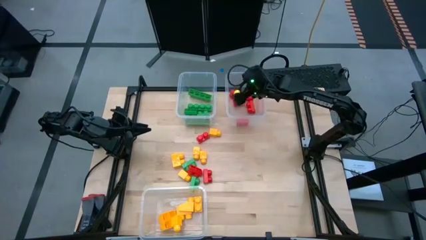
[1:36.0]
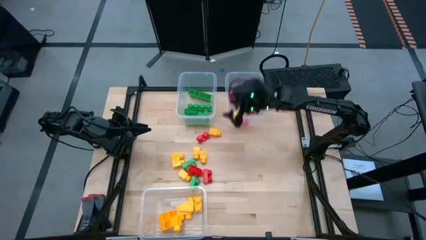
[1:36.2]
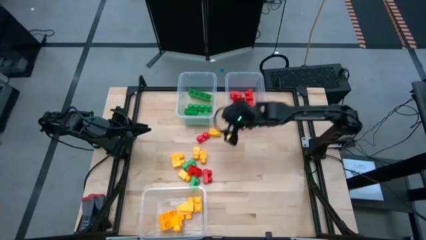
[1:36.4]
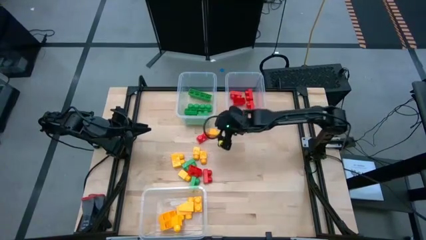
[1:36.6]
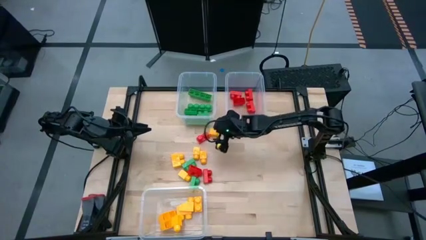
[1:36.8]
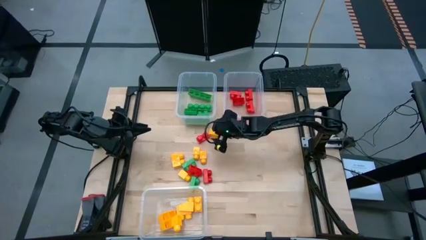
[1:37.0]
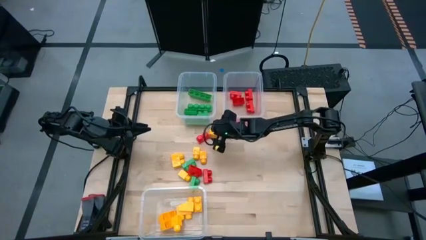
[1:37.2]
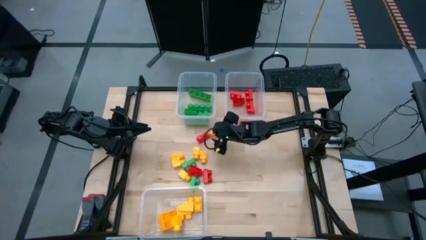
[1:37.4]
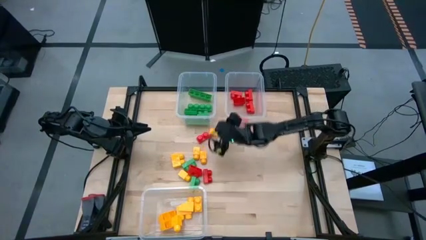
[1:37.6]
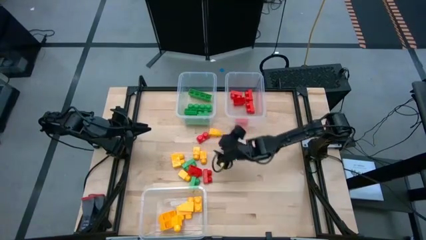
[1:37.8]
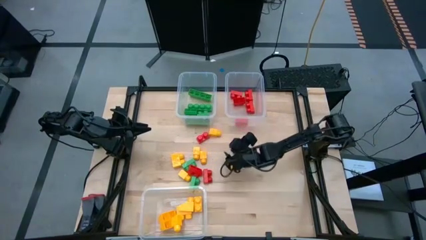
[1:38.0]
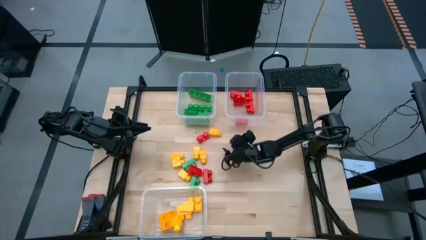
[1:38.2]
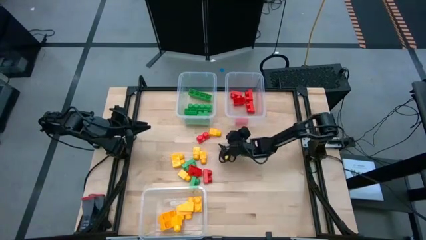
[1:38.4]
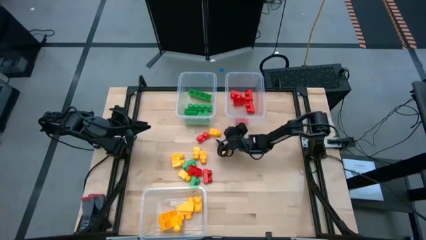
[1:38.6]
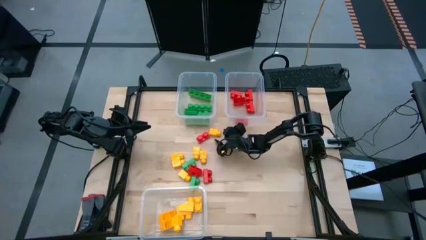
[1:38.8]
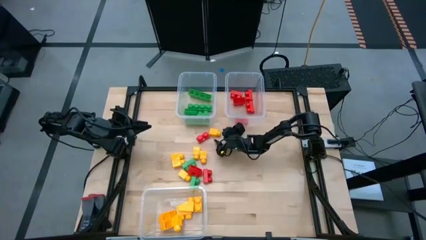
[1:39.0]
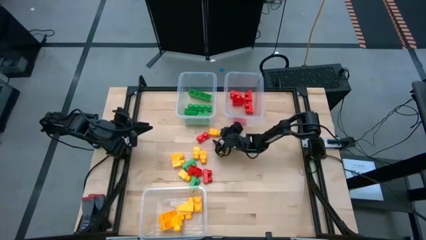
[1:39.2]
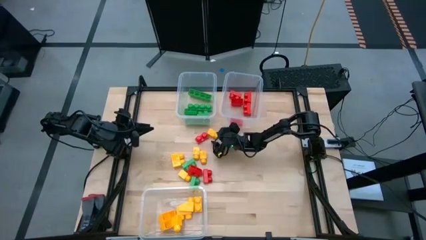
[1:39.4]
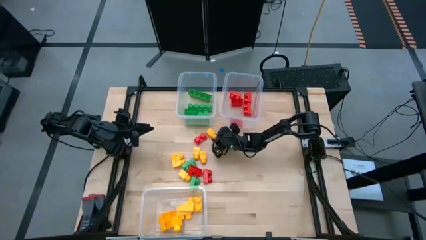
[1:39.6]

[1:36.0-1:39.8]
Task: Sort blocks
Put the yellow game piece into the bottom transparent bin

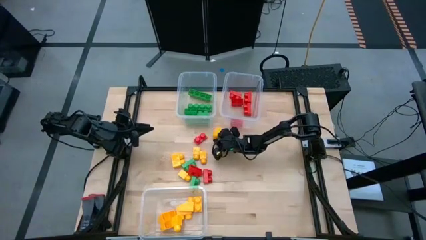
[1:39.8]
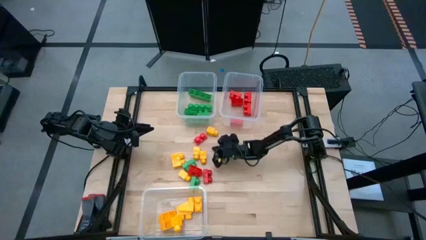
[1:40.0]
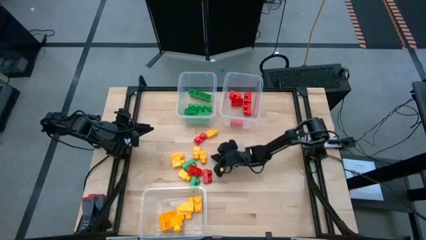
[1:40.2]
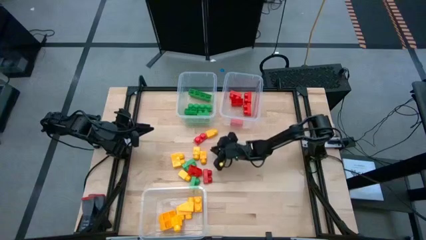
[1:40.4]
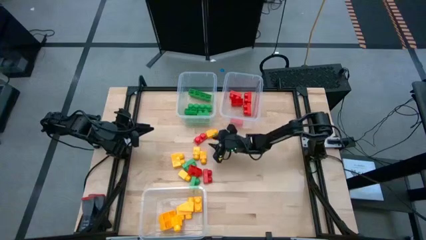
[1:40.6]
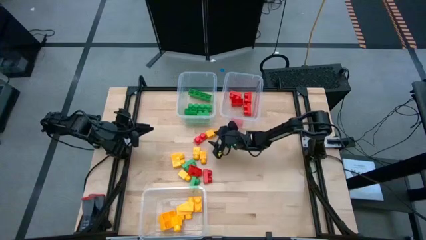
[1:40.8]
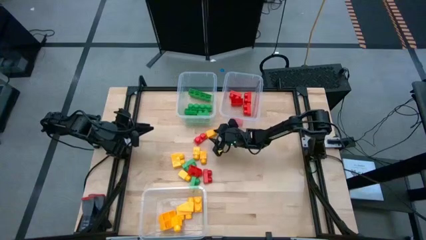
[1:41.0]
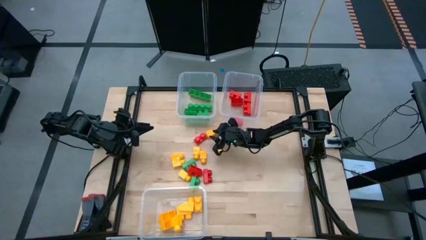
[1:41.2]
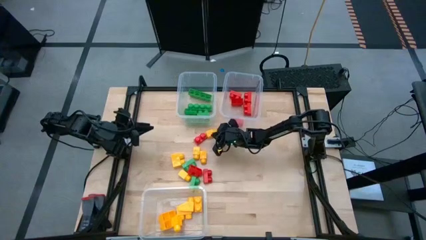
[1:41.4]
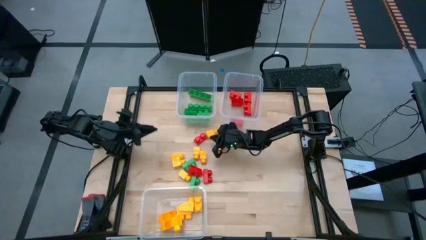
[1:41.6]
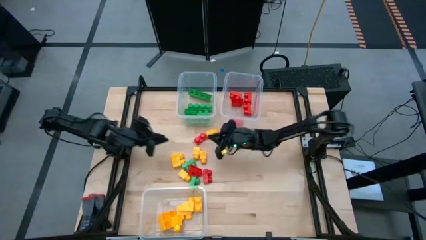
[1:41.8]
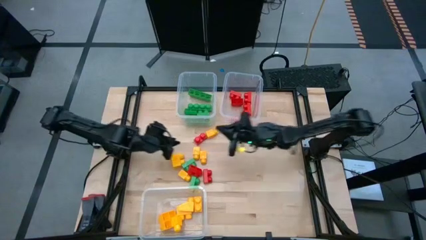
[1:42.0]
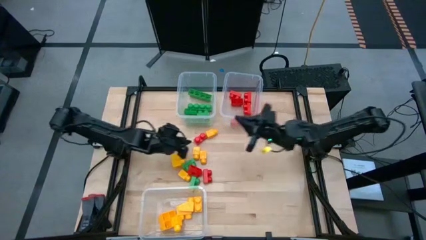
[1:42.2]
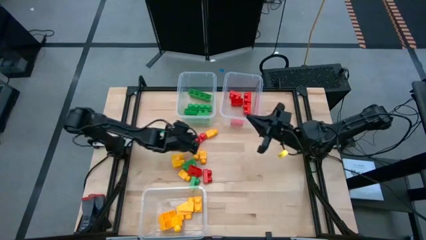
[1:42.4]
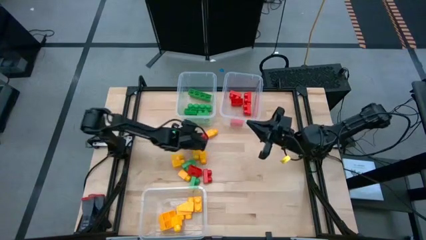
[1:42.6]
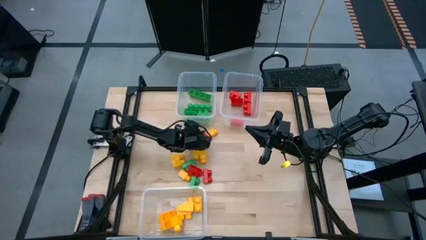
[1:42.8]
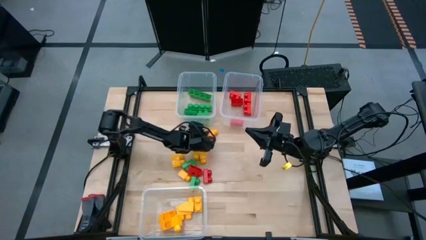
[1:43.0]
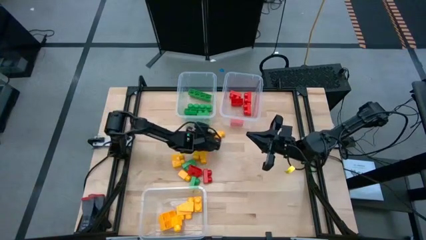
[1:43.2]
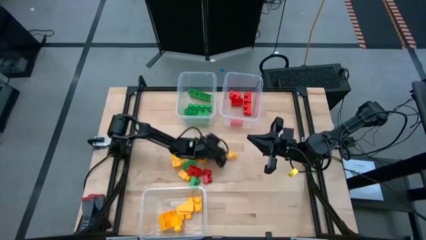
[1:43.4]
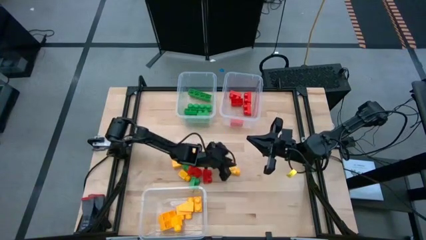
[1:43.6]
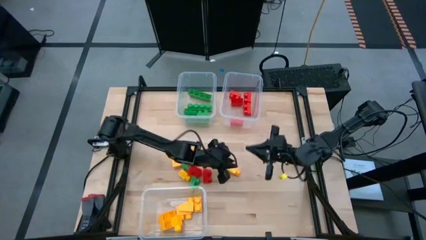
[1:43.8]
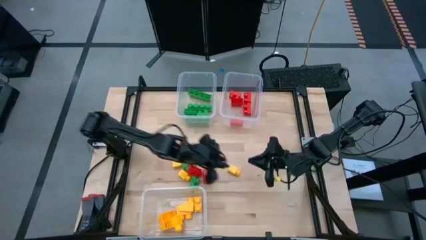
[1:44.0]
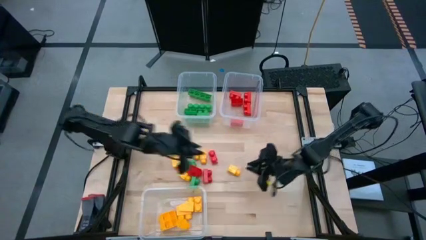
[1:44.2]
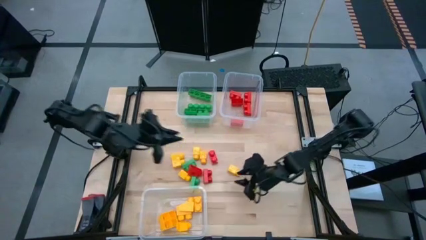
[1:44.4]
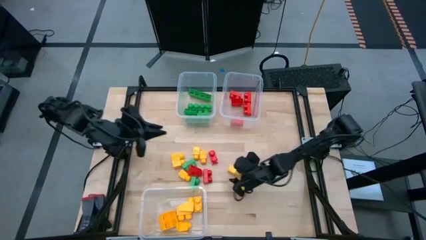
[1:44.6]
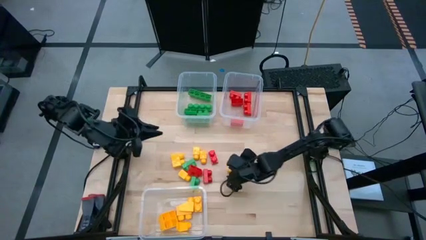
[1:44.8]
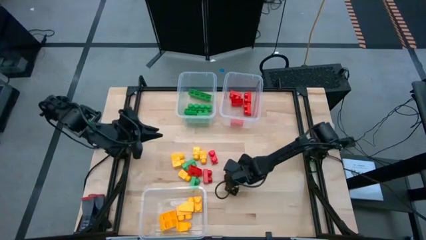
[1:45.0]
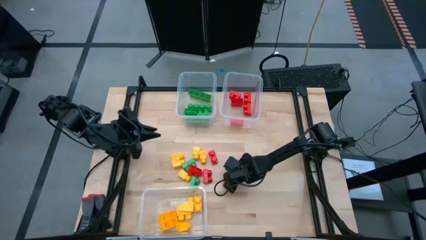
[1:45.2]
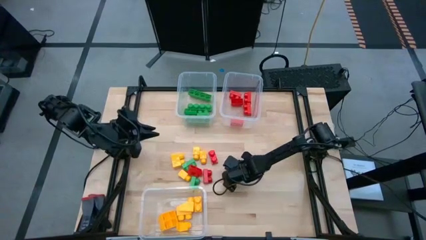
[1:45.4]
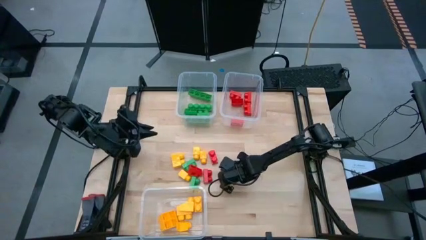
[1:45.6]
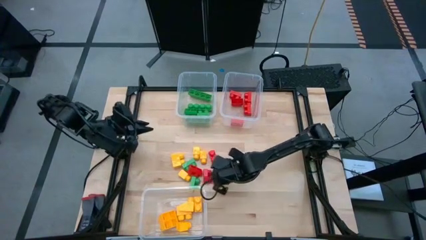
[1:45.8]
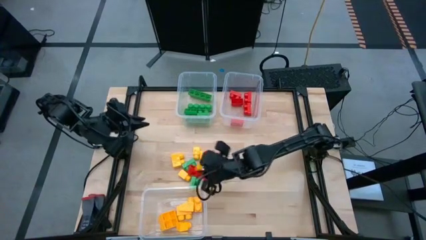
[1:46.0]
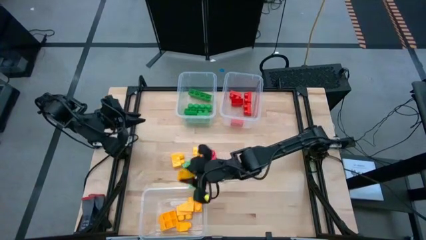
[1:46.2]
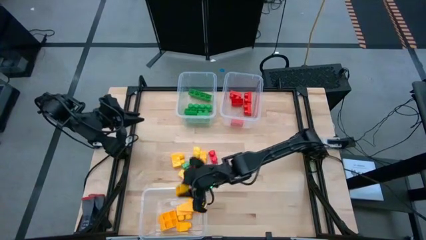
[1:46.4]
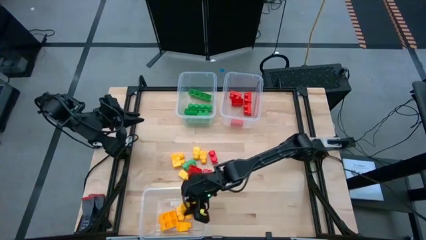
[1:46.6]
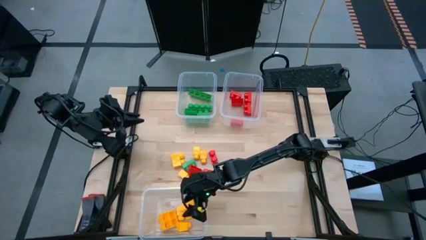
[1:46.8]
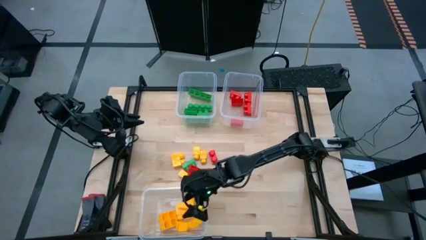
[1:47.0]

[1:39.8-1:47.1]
Put the yellow game piece into the bottom transparent bin

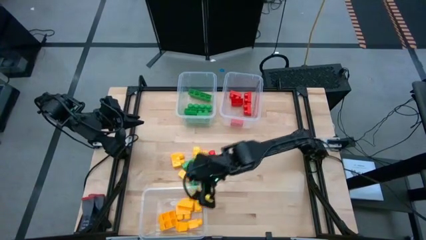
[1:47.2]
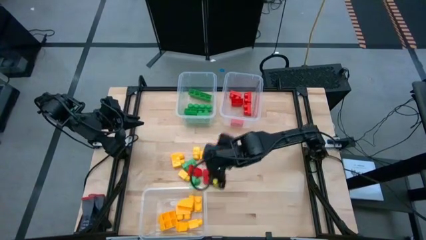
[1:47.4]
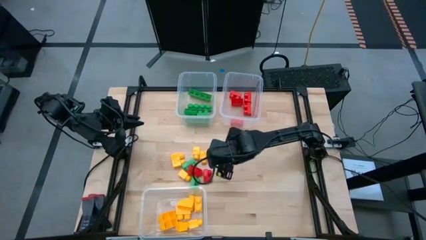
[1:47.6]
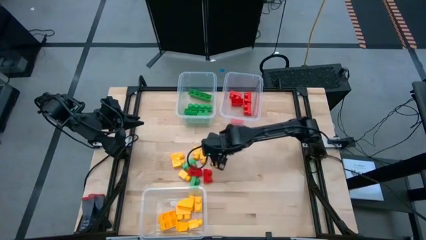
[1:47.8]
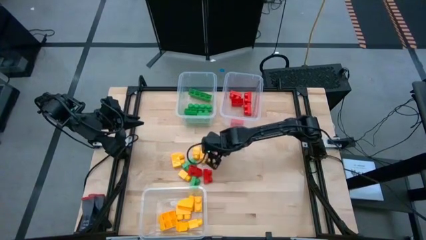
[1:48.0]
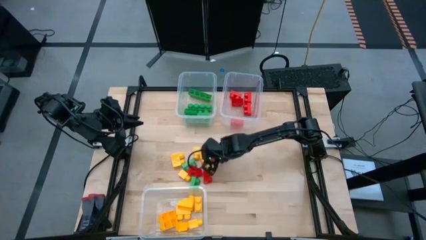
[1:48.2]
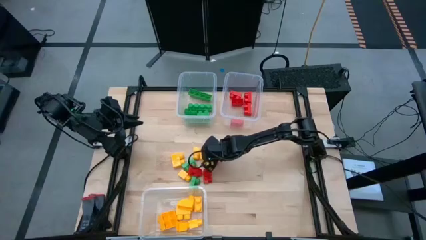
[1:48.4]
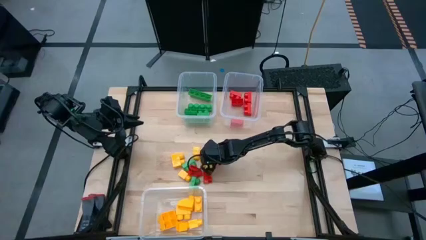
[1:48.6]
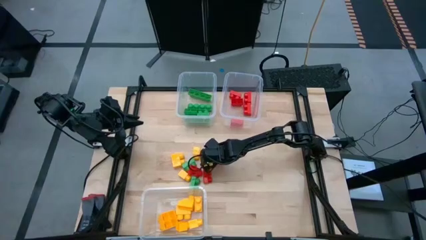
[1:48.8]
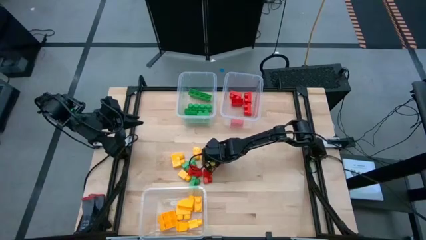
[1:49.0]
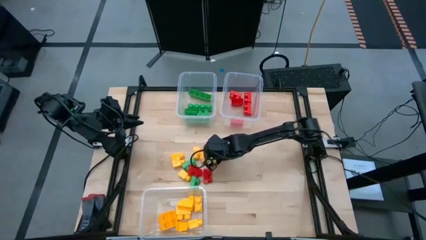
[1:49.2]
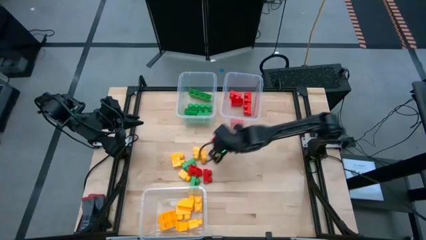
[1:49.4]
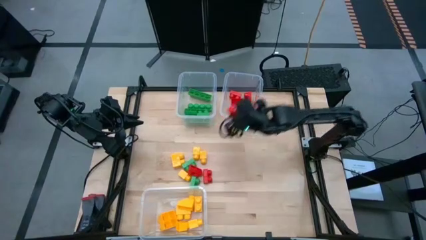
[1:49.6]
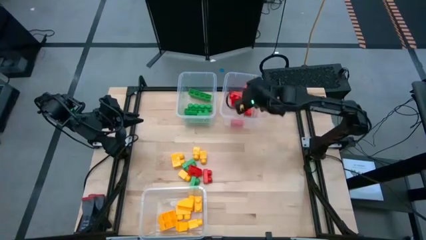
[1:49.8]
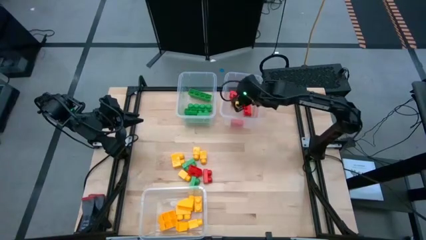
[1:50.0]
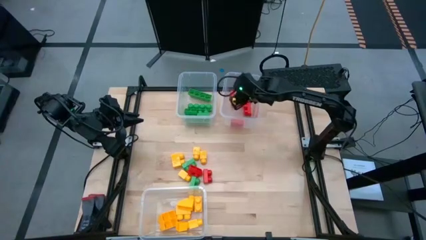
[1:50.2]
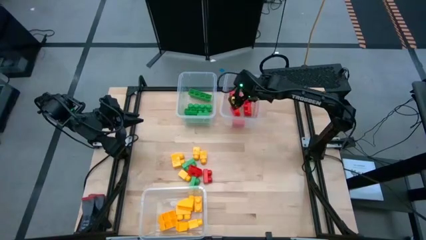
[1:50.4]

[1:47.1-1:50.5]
Put the red game piece into the top right transparent bin

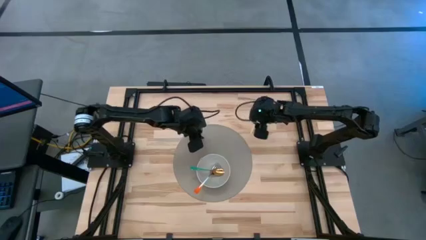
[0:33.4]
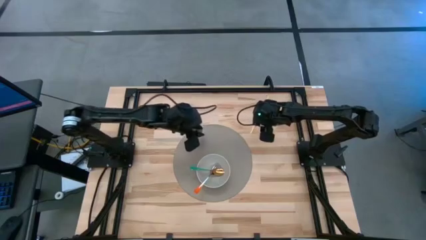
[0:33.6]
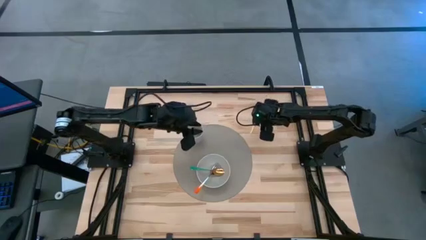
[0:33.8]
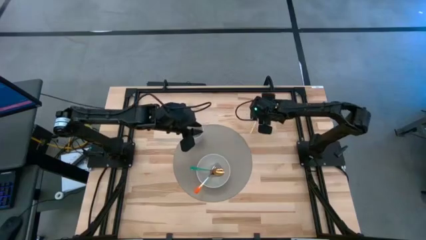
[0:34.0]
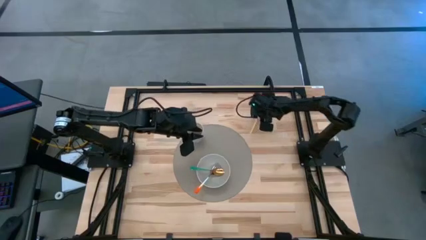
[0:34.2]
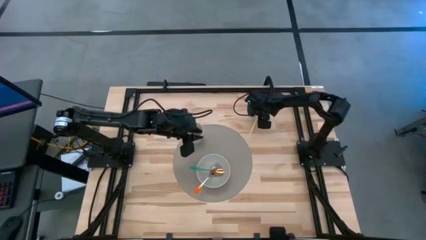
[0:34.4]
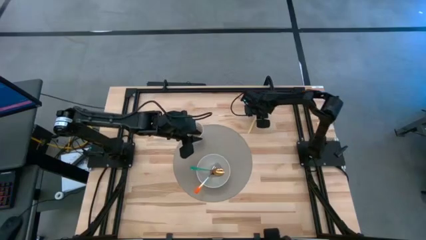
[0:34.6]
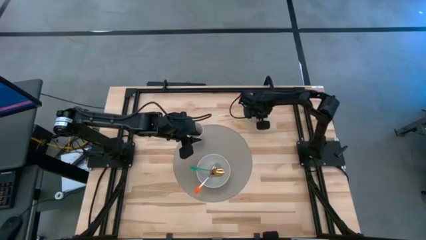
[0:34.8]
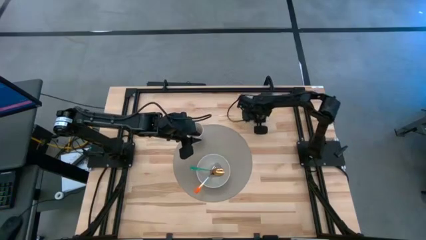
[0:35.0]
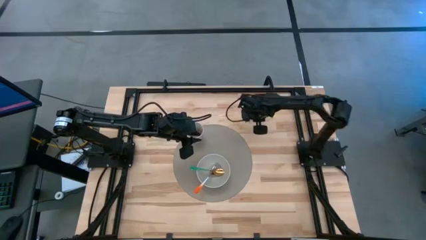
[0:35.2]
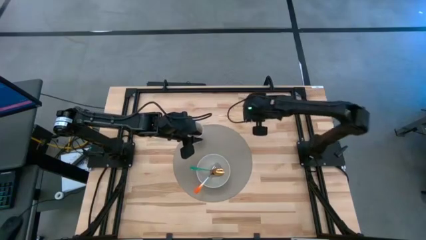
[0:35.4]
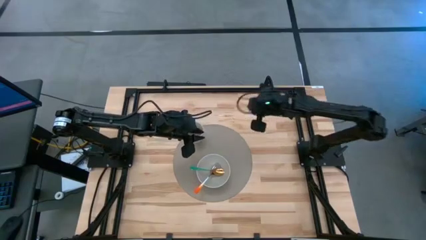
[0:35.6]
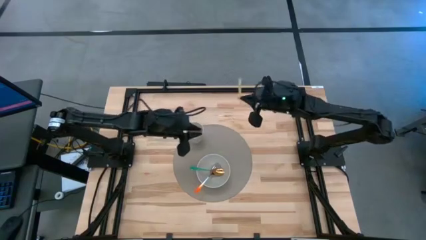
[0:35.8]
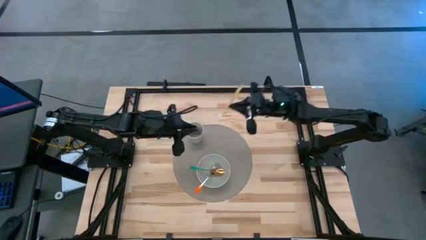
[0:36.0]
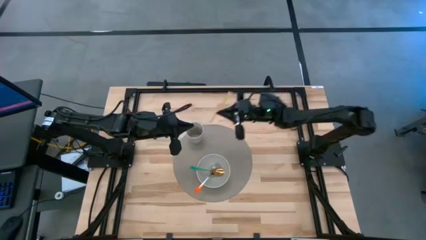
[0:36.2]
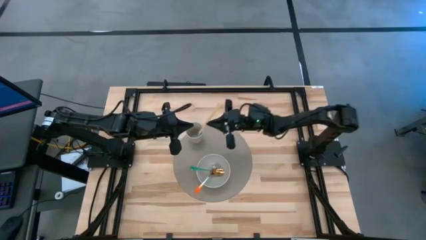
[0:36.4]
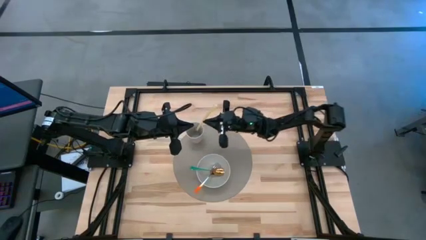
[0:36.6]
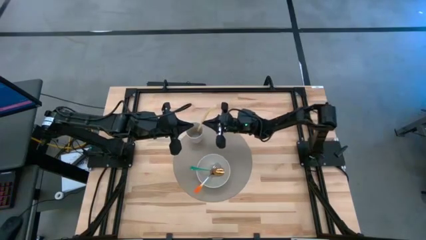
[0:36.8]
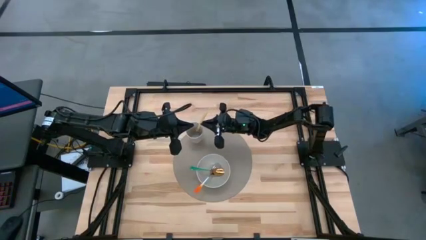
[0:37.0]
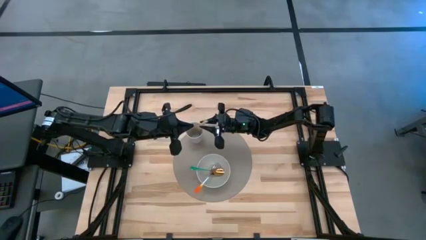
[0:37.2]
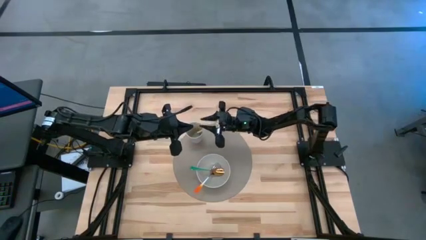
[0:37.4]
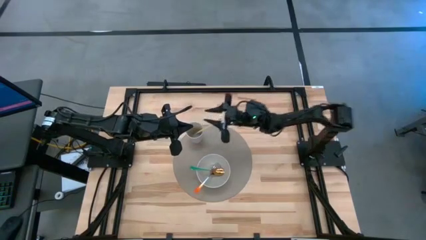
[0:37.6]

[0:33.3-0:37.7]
Task: Pick & Place Utensil
Put the yellow straw in the gray cup on the gray placemat
